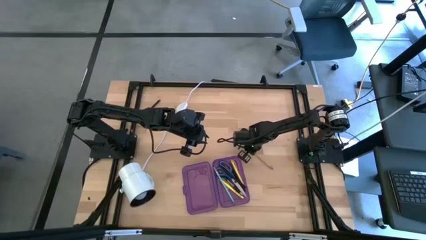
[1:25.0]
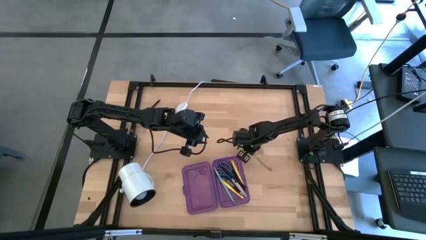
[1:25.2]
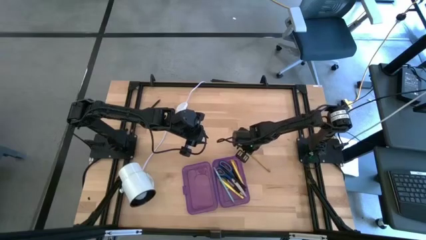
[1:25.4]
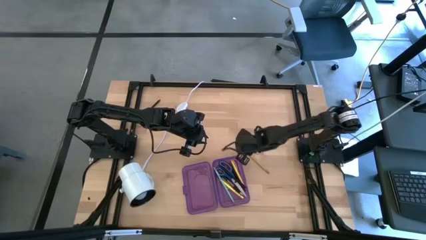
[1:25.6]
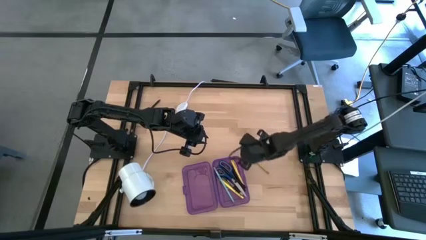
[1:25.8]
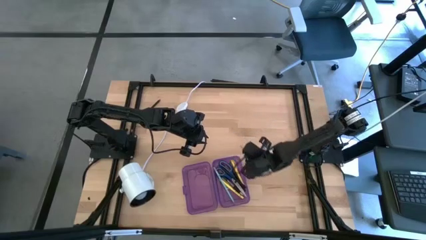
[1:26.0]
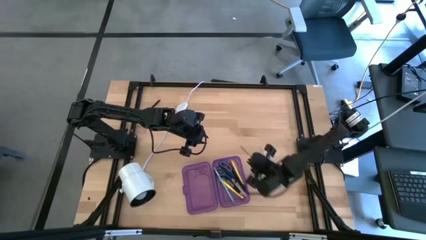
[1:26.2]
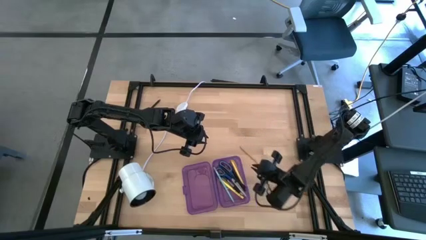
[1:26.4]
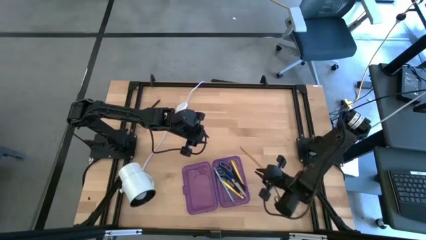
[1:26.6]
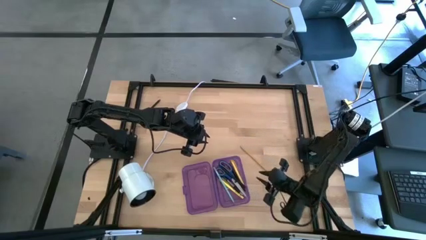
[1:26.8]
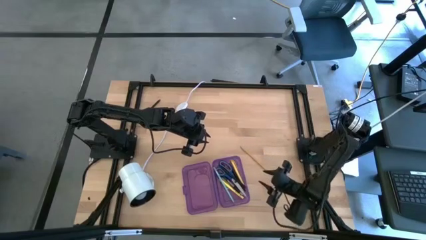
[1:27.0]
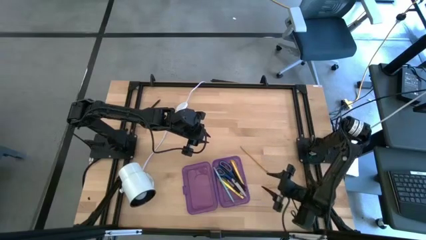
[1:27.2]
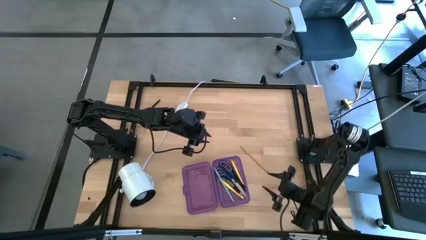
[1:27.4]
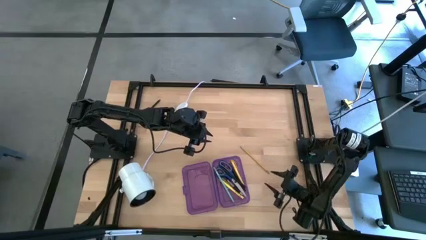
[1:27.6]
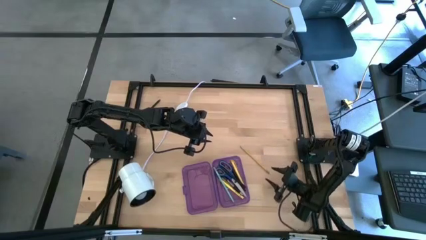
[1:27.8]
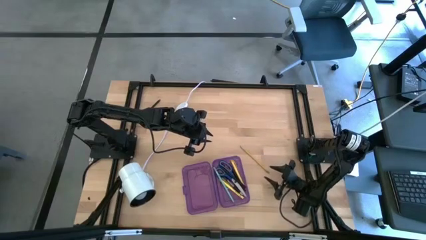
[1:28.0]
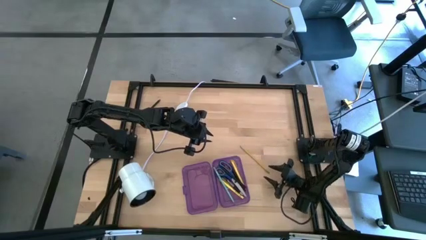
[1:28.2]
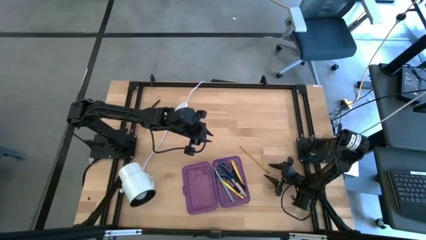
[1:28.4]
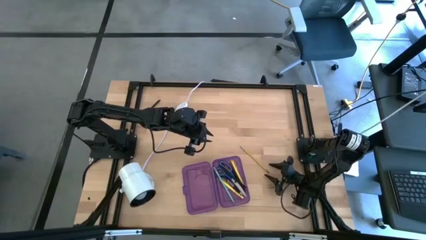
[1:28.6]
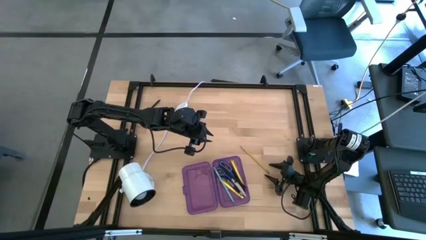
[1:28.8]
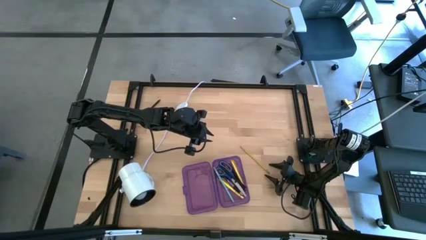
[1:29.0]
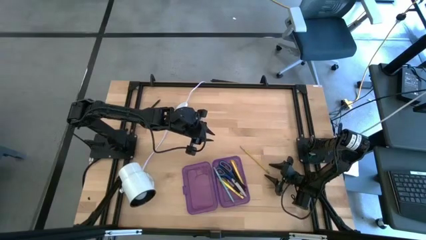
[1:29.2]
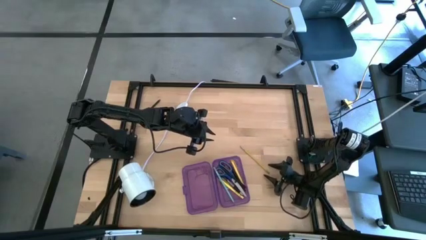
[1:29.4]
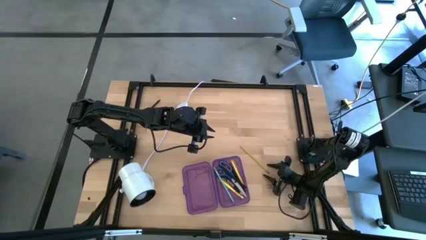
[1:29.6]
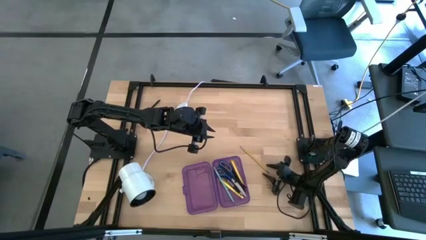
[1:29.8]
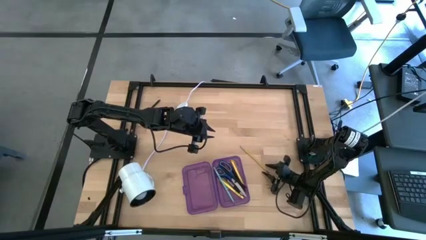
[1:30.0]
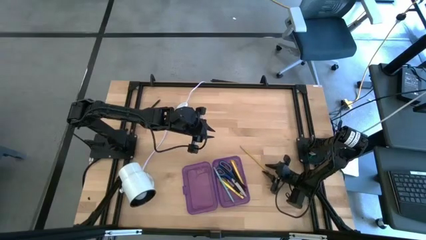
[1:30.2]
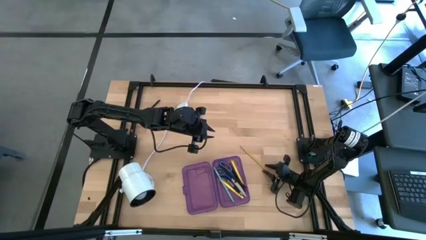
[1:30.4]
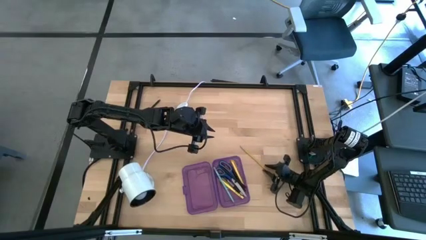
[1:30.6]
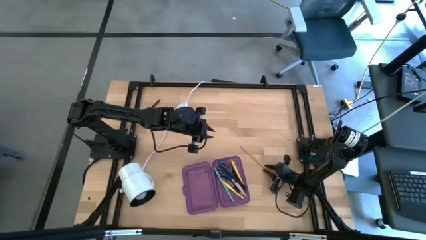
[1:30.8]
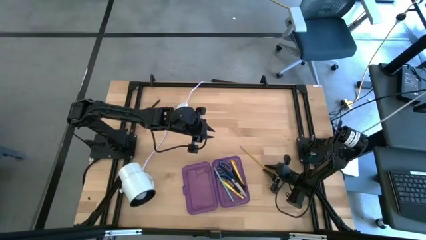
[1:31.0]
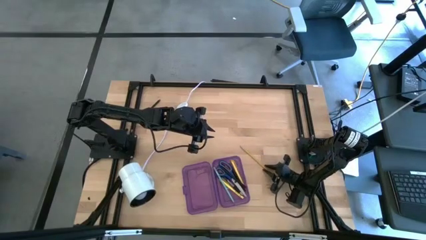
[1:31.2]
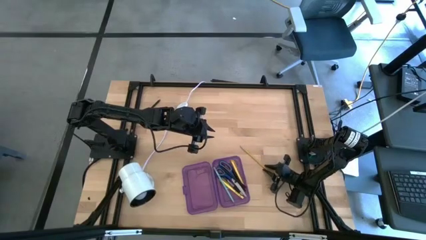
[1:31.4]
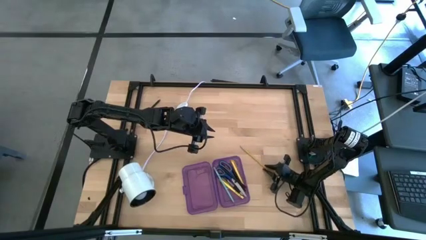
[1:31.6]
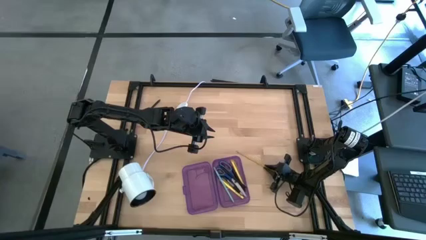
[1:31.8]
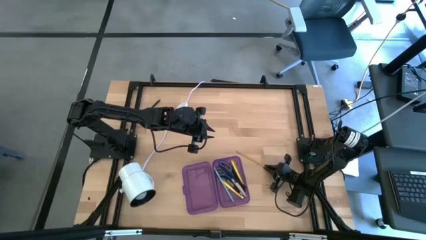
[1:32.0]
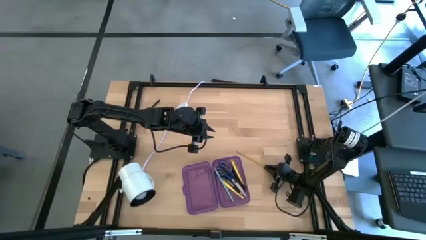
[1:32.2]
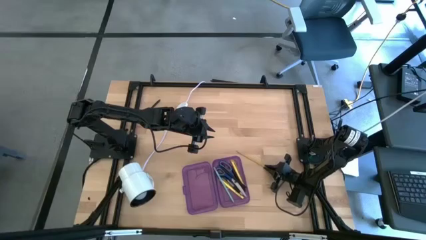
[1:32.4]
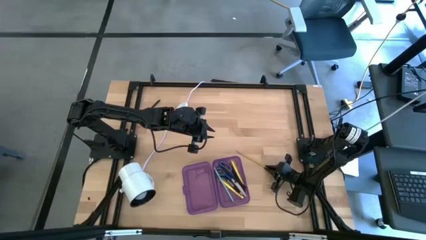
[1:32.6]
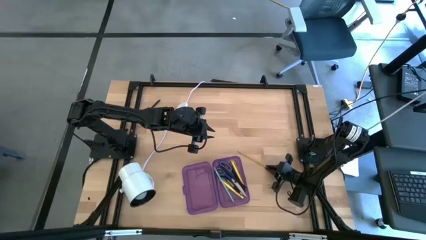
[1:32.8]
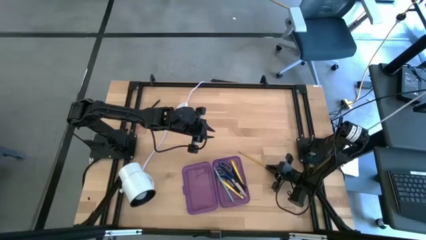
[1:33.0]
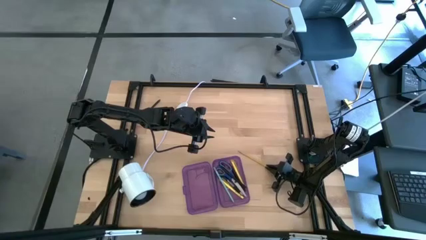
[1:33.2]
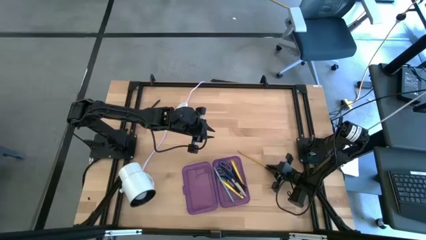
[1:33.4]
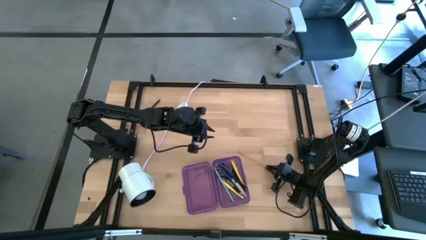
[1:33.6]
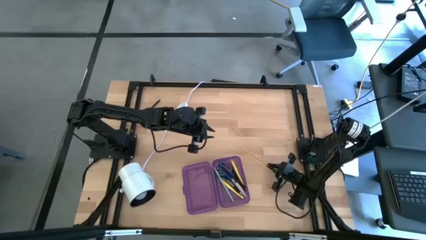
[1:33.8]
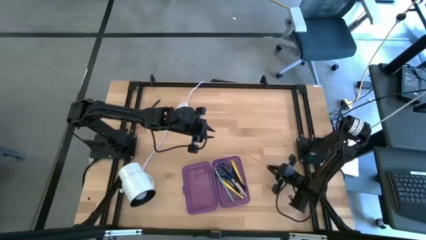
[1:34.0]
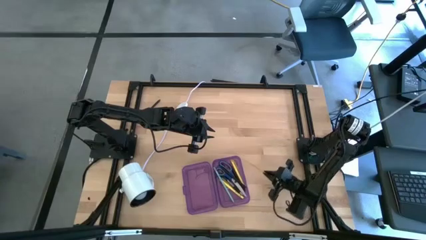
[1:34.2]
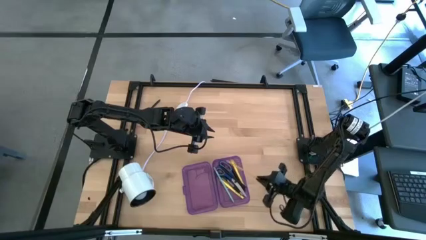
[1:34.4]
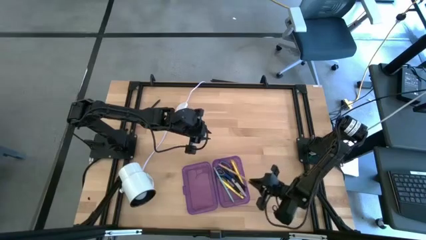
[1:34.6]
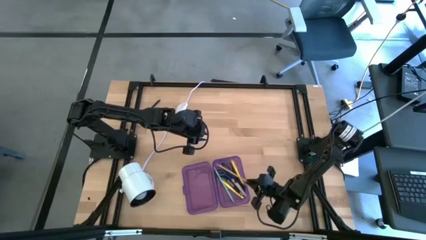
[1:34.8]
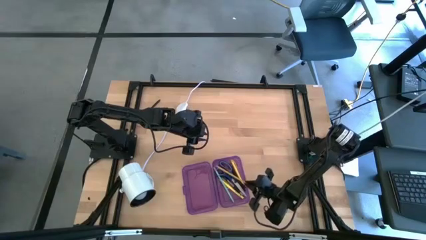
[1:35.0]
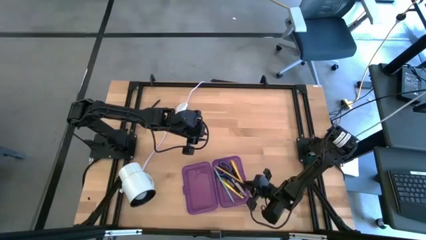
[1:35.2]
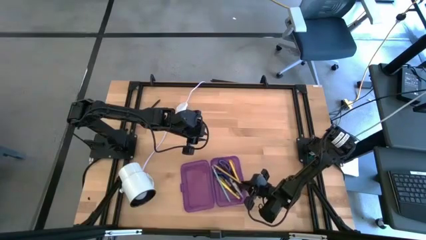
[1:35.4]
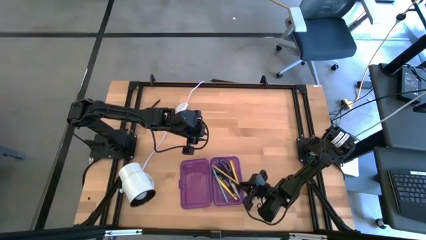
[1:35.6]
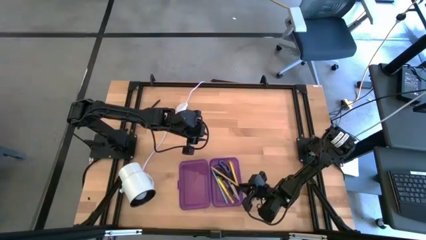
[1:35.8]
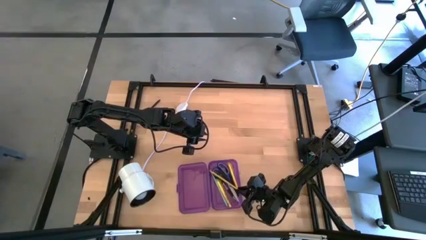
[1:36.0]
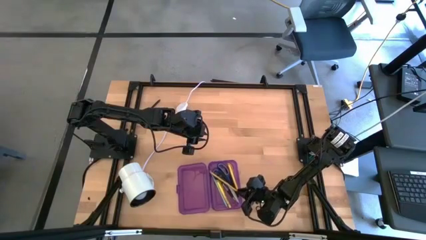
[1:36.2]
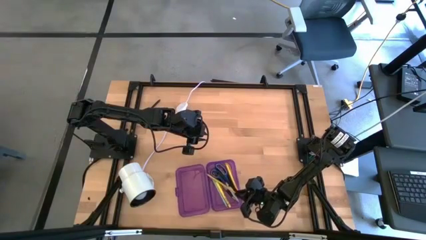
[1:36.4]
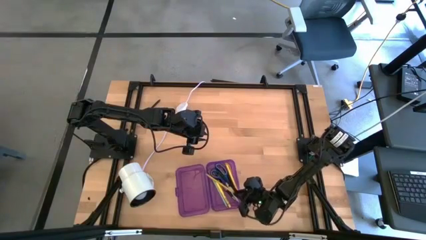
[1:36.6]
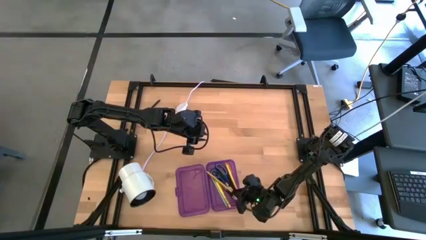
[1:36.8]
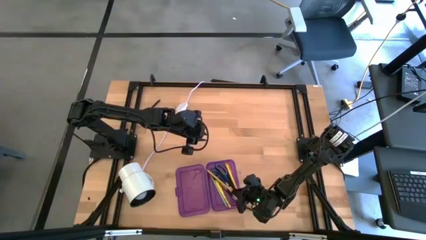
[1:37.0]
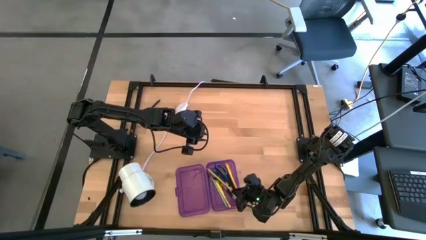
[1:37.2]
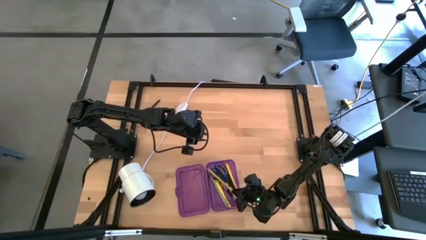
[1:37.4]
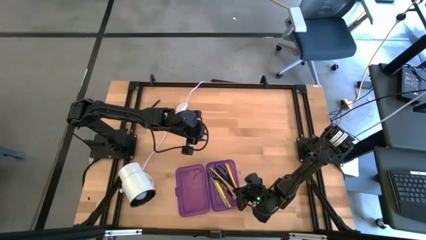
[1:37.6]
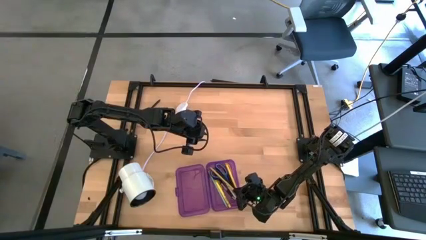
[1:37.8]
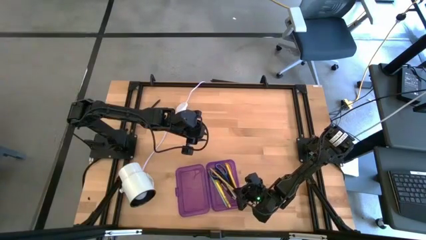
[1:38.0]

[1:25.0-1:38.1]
Task: Pick & place school supplies into a supply box
Put the yellow pencil into the purple supply box

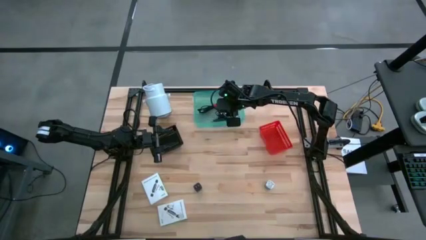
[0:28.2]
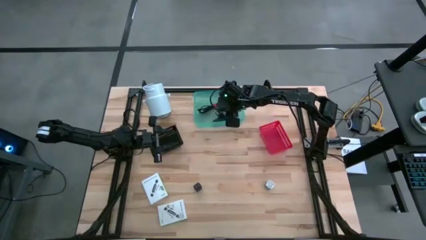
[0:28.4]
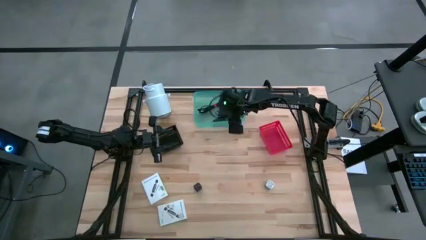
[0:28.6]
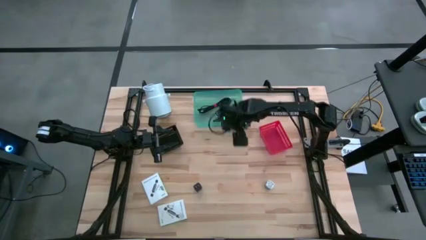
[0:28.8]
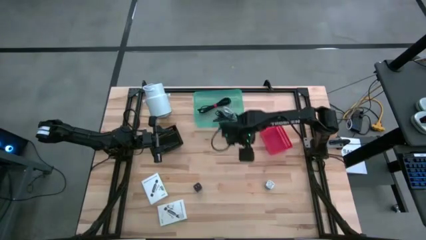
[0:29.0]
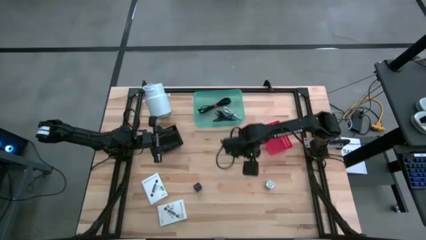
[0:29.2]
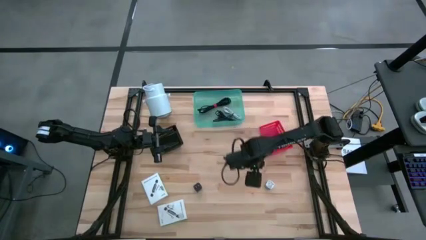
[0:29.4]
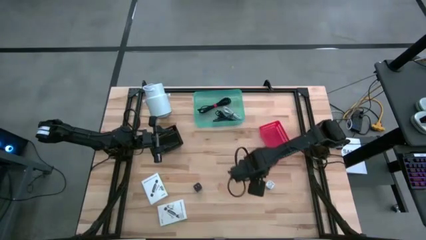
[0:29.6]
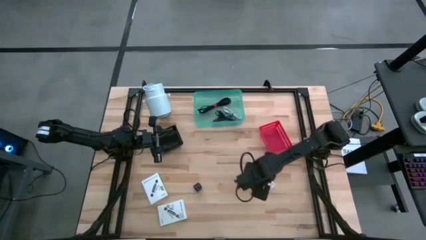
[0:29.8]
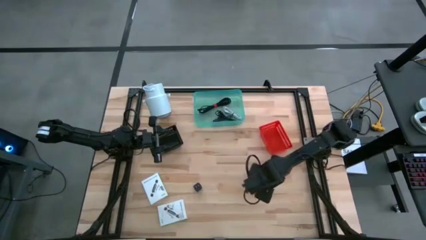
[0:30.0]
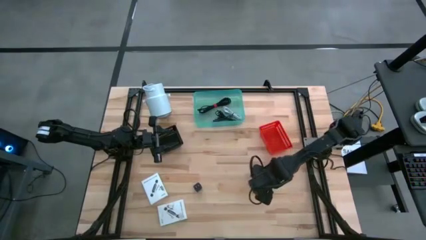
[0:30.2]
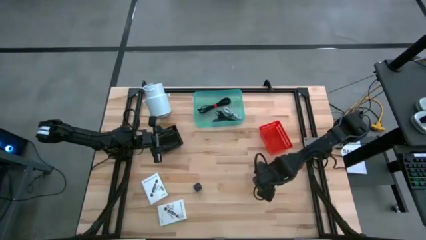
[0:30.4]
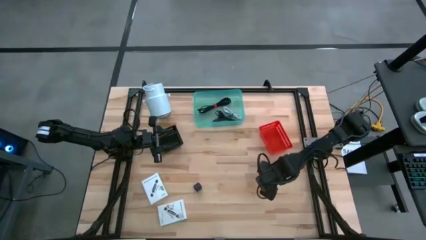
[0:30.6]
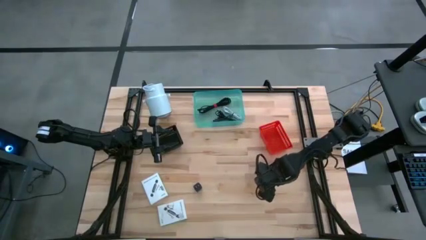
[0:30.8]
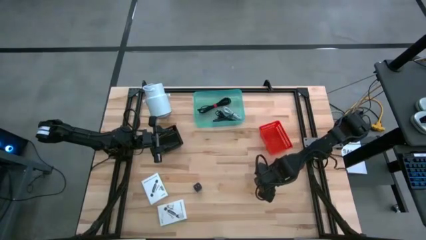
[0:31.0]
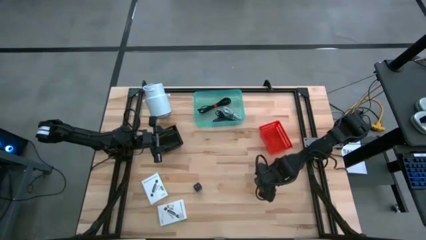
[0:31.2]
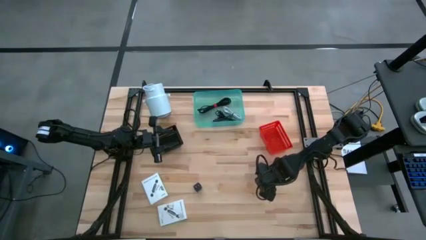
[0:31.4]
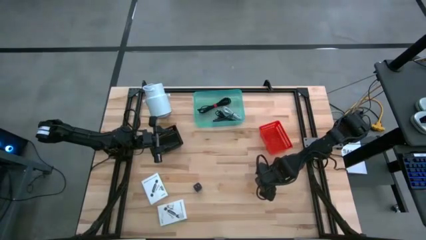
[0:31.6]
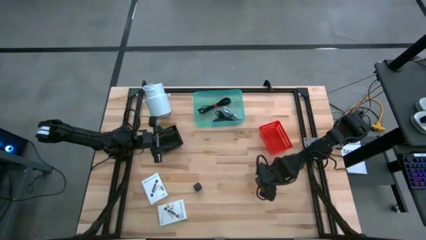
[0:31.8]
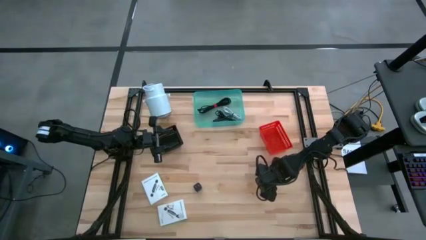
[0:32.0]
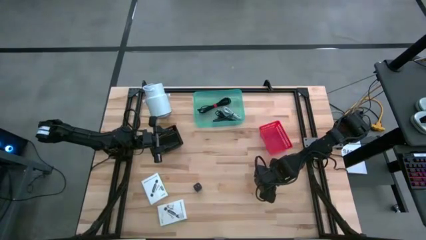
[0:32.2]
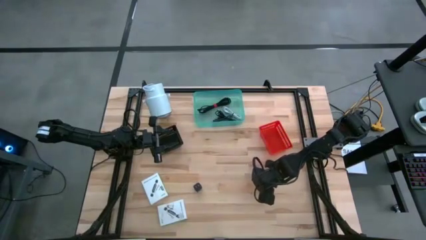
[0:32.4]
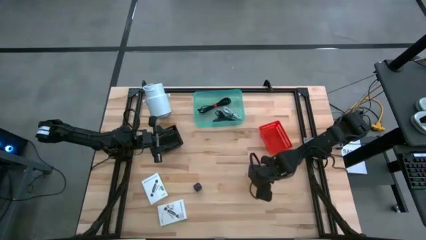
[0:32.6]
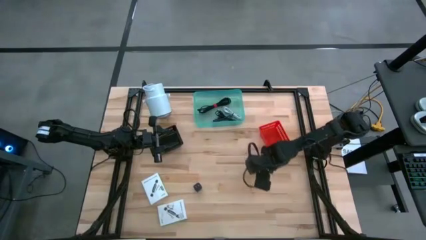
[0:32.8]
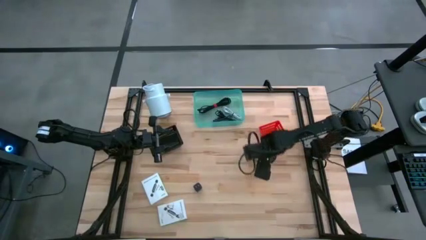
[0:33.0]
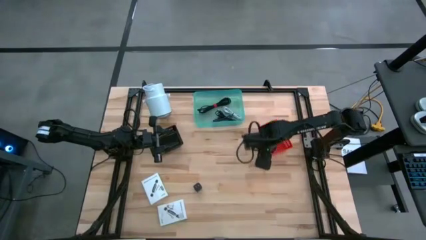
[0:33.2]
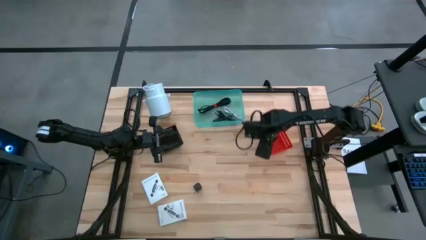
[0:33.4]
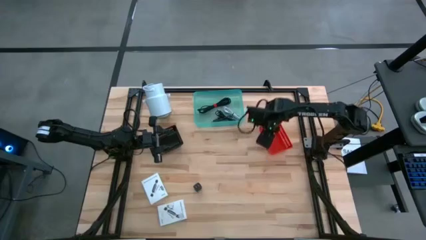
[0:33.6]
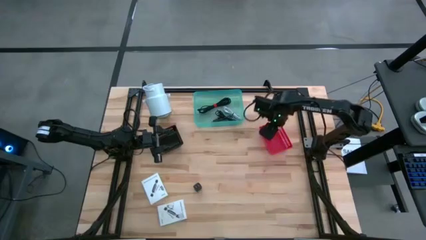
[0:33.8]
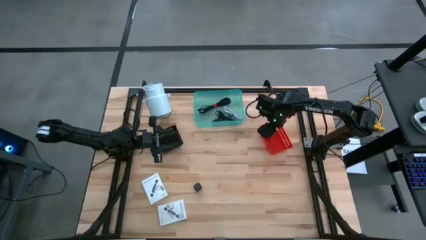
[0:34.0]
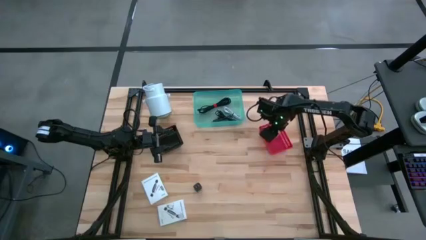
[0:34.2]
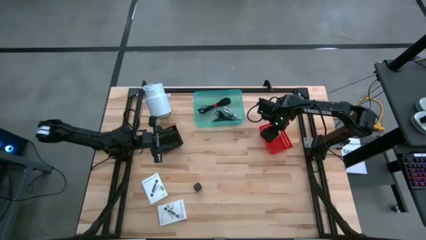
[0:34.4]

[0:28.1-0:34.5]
Task: Pick and place items into bin
Put the blue charger adapter into the orange bin
